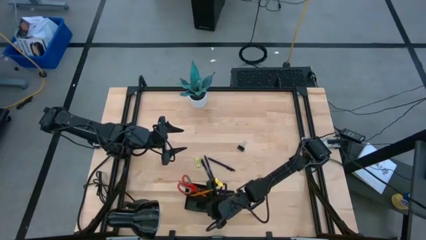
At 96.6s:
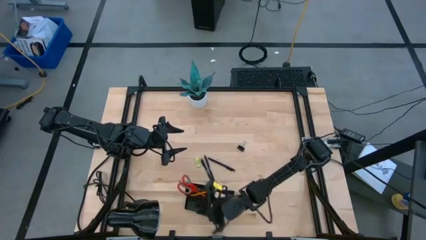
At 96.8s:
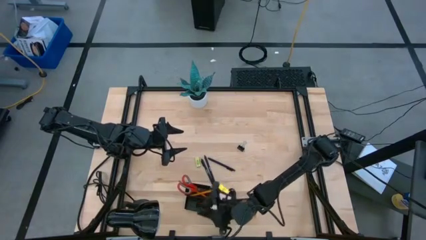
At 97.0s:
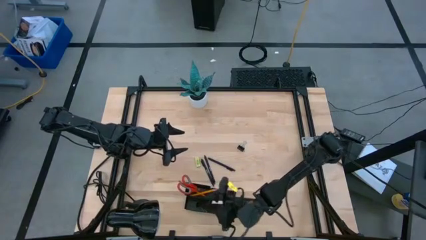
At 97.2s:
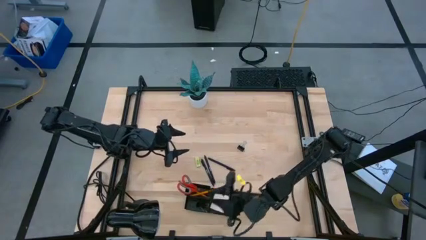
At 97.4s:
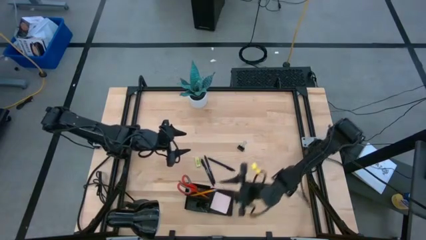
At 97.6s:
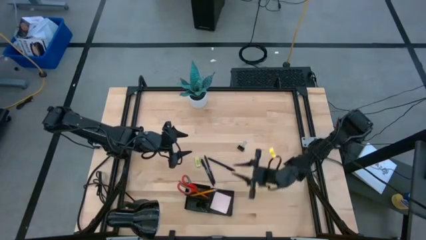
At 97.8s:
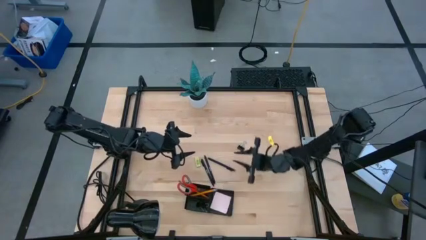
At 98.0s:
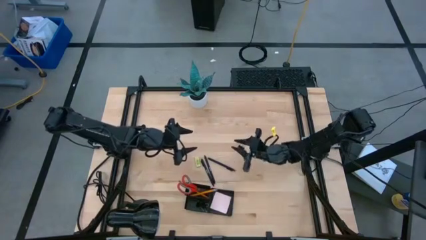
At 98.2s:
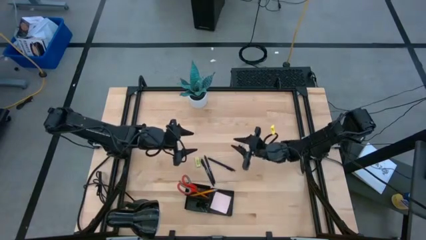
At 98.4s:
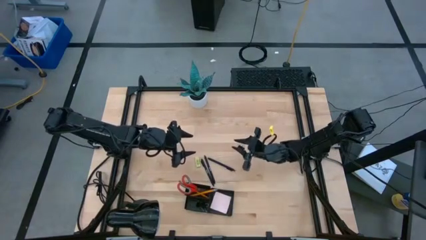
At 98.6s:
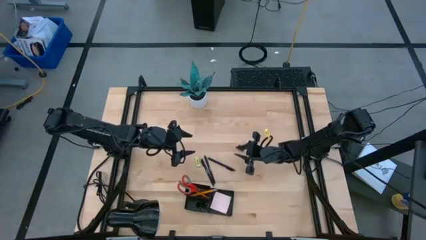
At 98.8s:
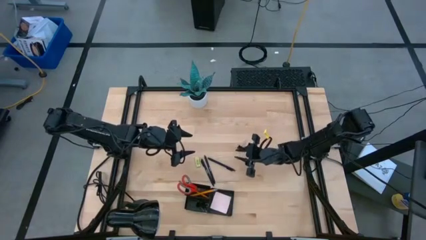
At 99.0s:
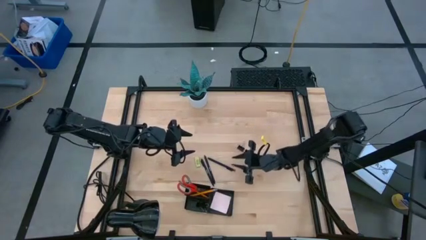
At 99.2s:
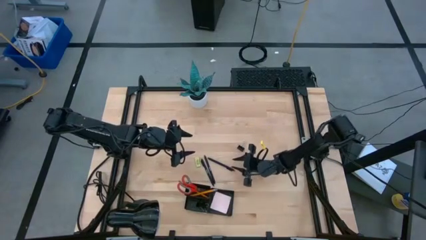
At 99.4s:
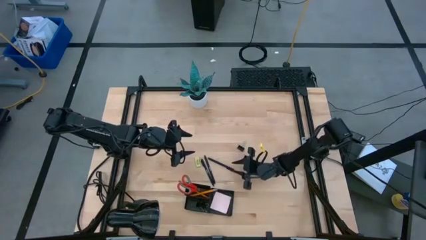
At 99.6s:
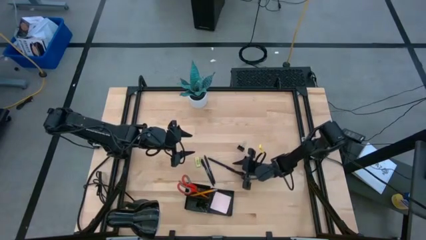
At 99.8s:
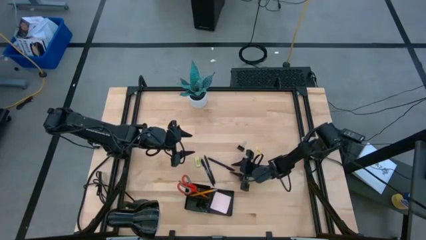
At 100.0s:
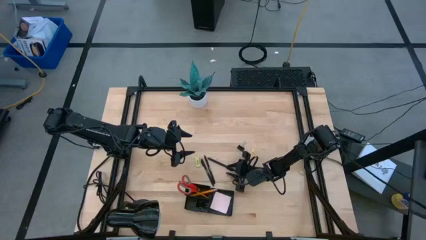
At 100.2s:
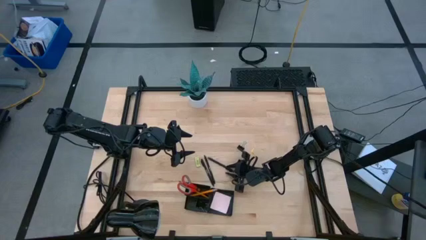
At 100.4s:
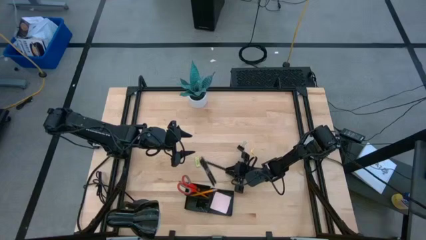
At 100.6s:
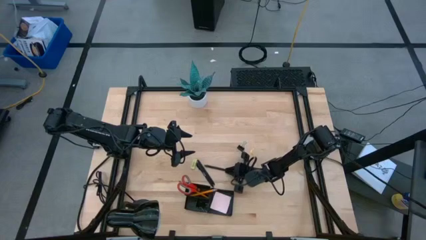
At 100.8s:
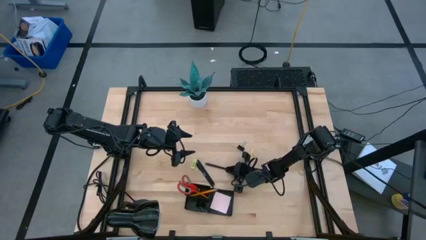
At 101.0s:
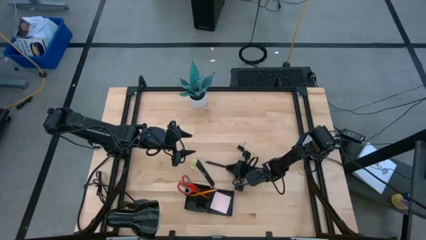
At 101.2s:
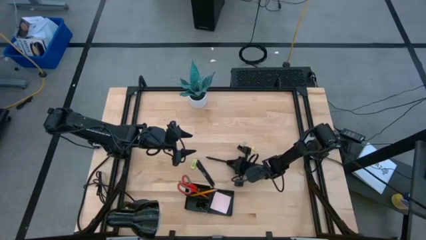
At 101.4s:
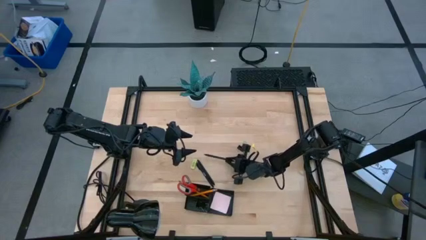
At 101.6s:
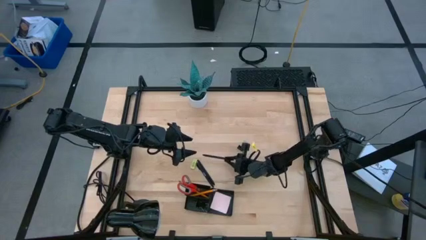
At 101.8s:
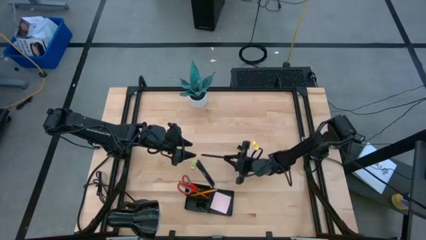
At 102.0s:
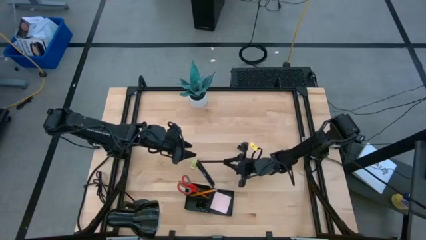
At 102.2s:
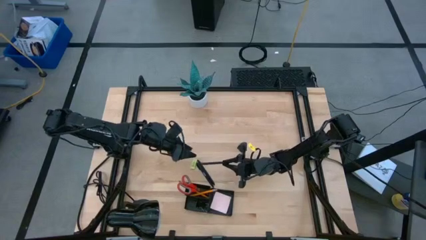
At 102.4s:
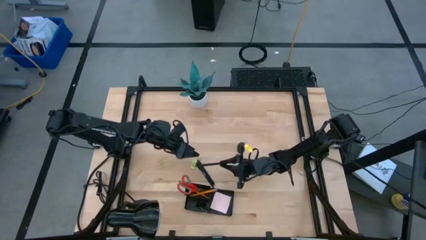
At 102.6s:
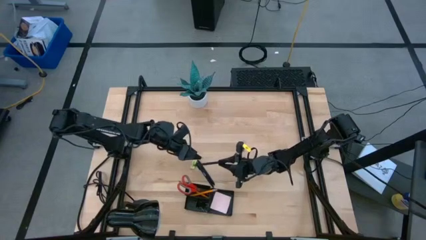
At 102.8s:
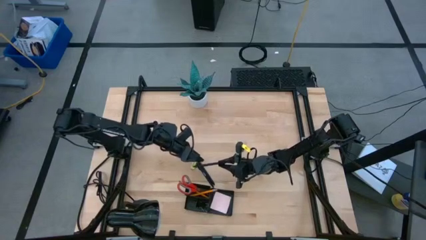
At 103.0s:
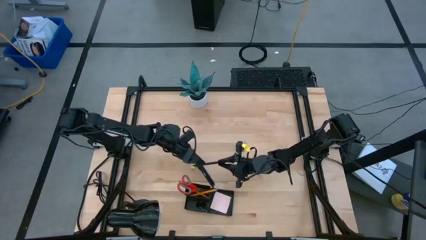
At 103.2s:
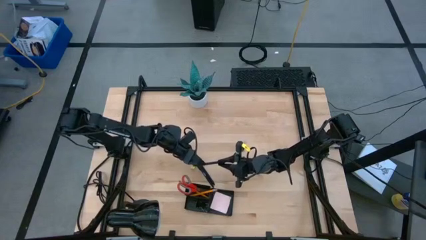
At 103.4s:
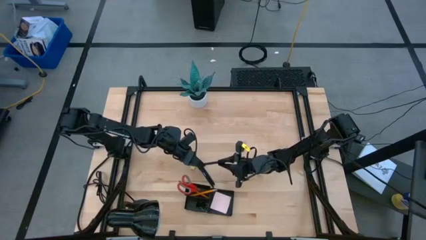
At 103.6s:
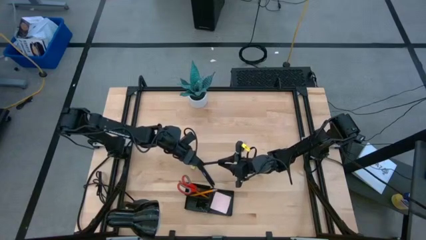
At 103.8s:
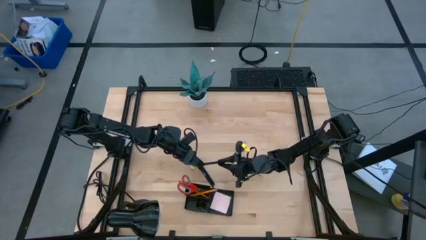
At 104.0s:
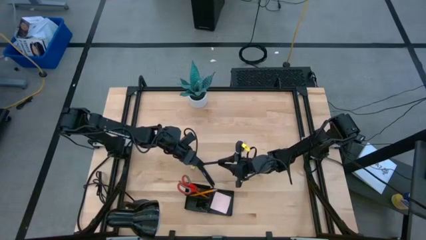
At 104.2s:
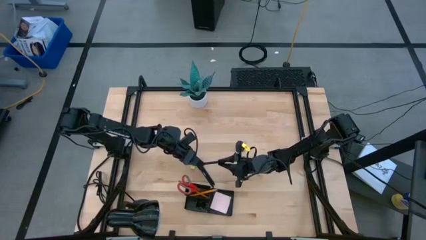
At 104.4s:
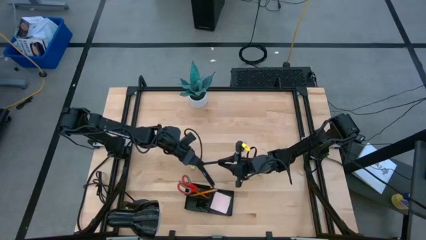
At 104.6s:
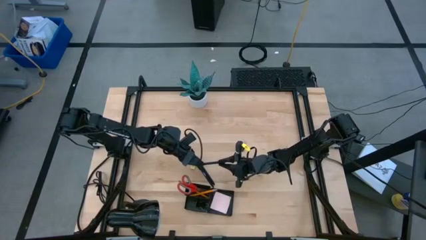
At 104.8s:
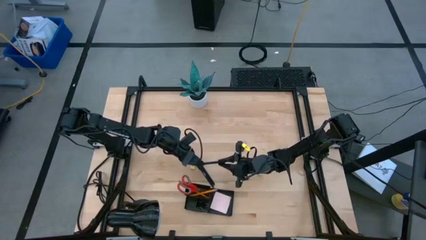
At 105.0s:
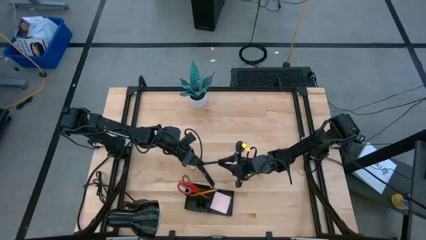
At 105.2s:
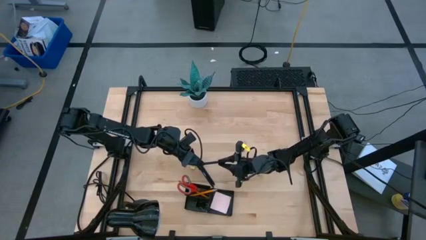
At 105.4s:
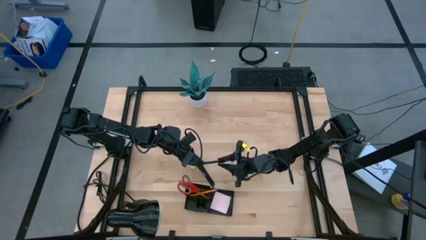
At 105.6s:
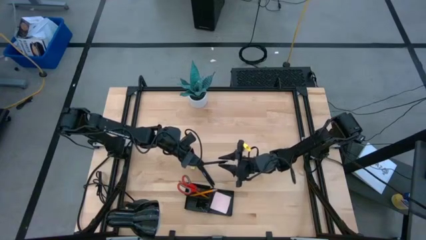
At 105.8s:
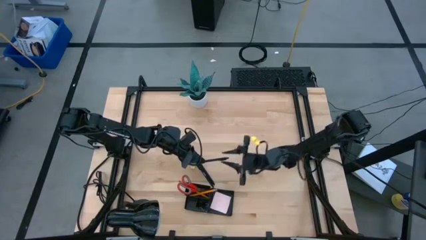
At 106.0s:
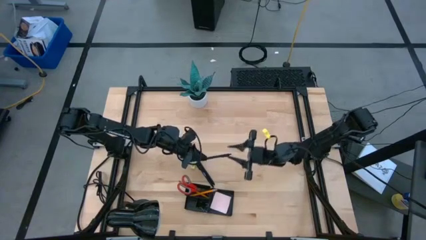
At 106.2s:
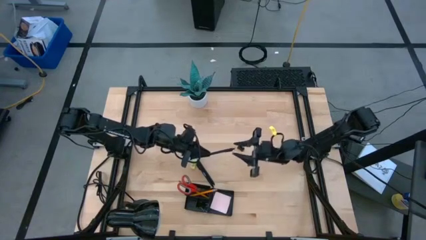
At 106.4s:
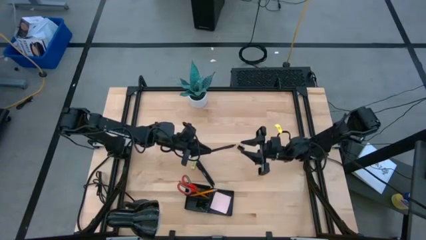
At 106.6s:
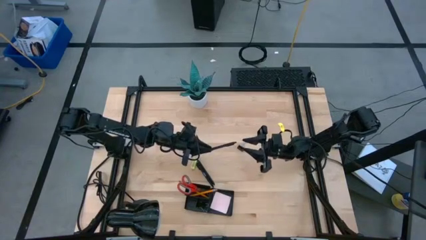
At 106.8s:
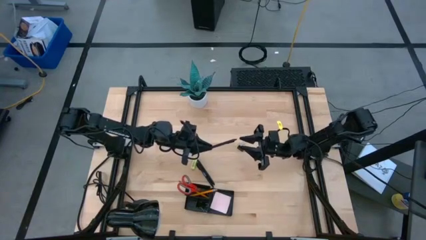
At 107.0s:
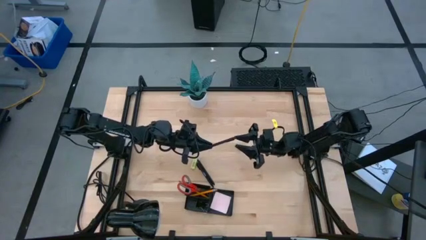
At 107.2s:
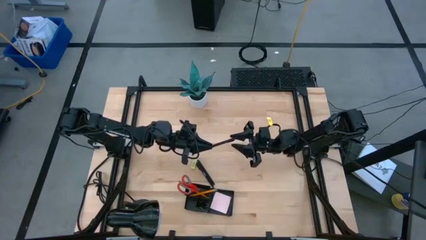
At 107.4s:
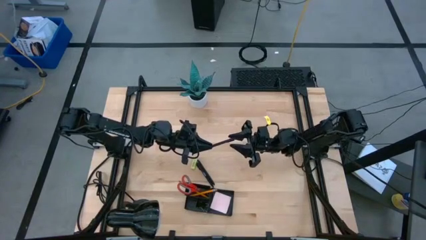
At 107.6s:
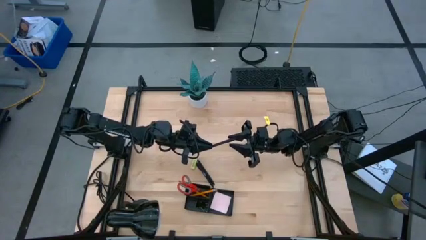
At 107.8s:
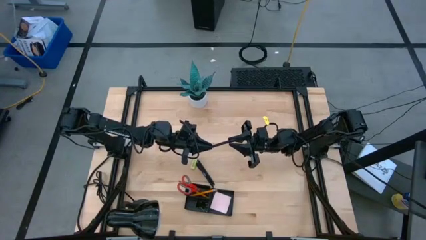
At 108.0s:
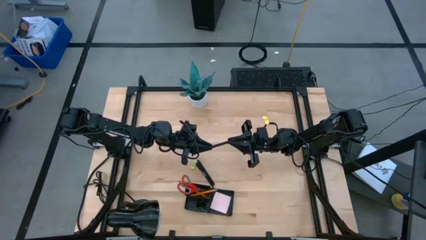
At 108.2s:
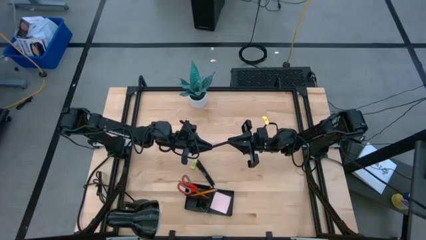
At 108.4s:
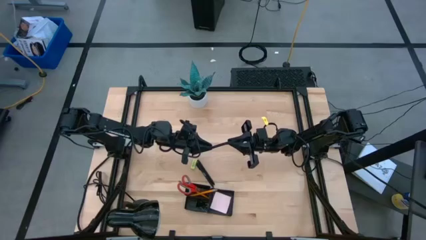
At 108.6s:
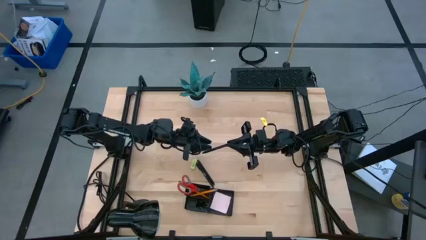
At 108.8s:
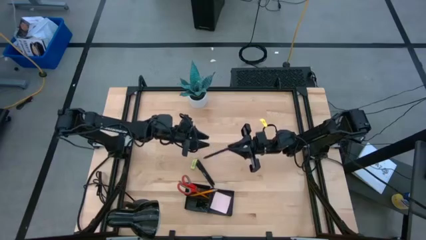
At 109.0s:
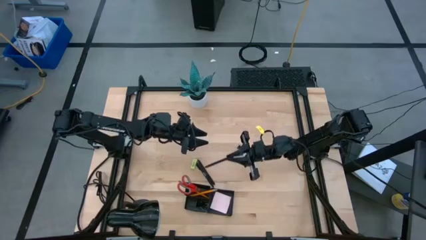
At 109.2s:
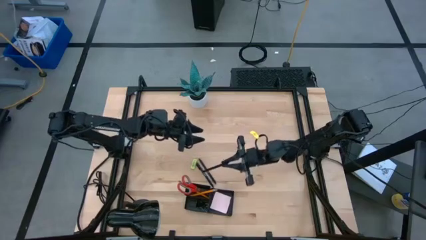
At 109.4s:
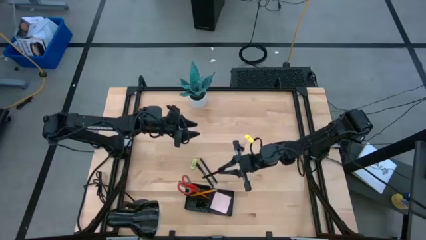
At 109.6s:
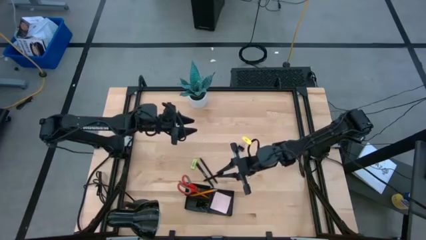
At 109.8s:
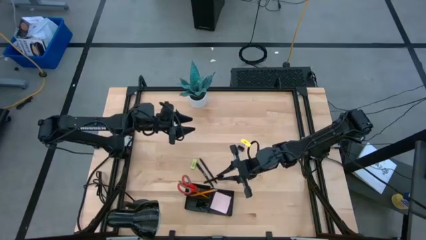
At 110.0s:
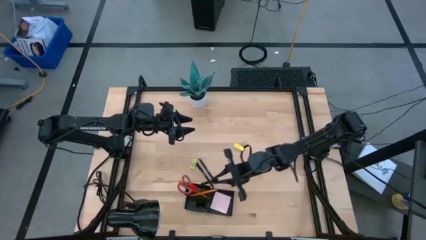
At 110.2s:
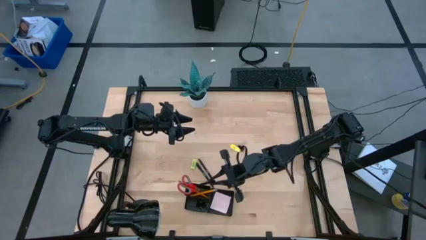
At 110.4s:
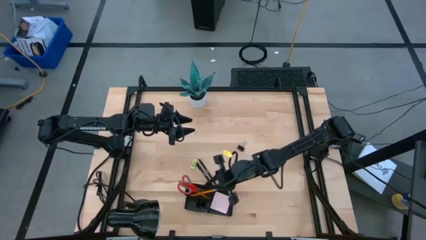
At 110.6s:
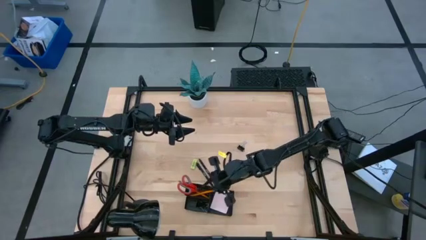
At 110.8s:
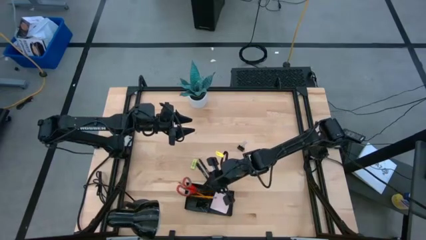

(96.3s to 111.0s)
Task: Pick and place office supplies into organizer
Put the black pen into the black desk organizer

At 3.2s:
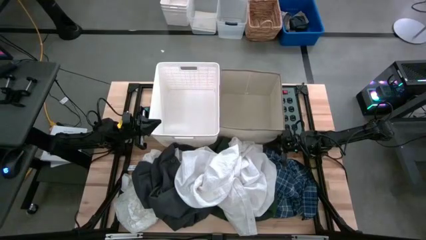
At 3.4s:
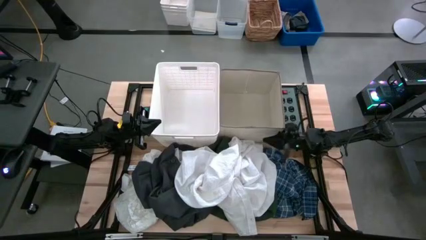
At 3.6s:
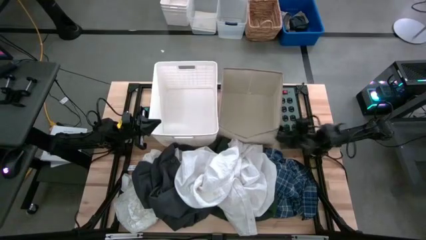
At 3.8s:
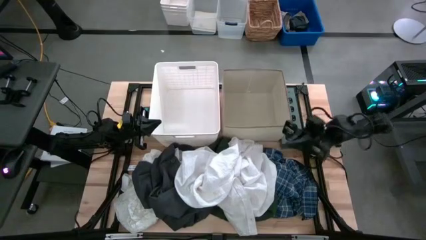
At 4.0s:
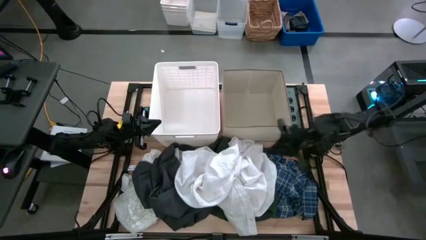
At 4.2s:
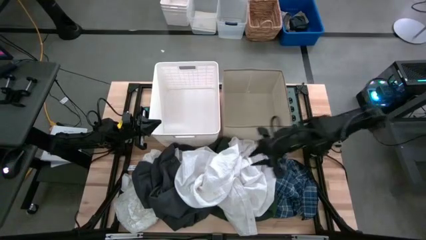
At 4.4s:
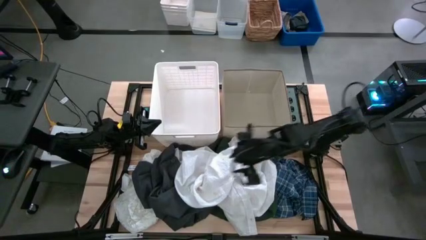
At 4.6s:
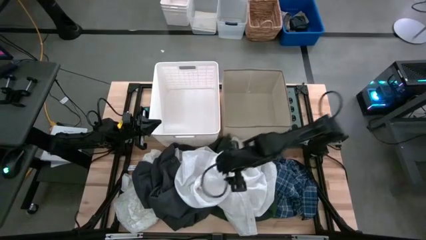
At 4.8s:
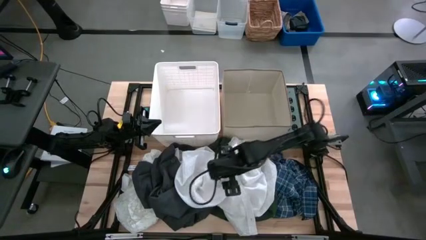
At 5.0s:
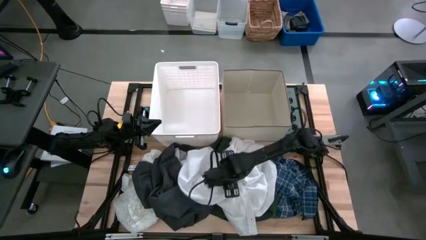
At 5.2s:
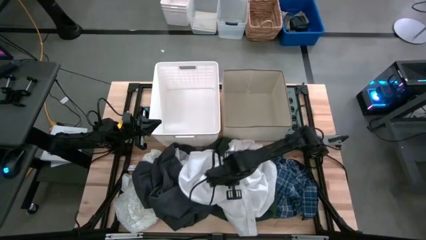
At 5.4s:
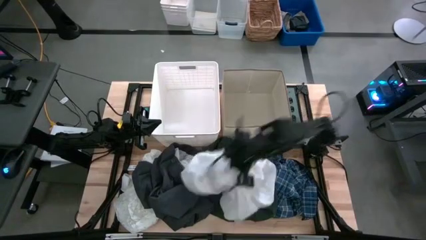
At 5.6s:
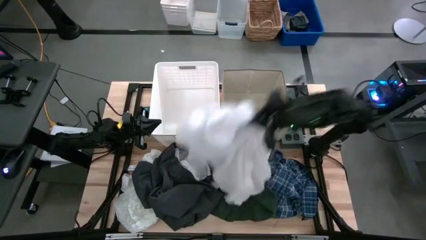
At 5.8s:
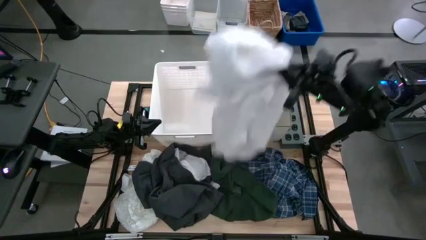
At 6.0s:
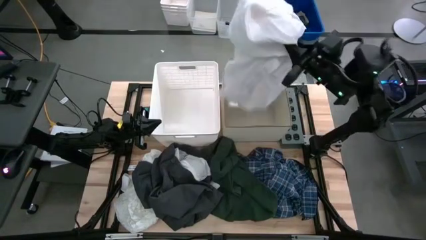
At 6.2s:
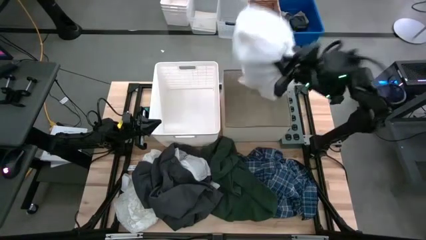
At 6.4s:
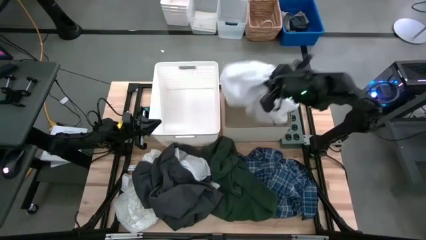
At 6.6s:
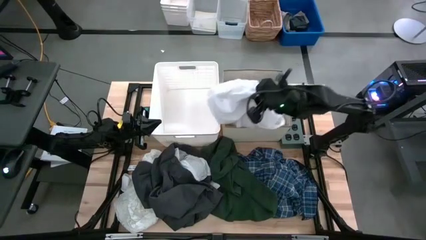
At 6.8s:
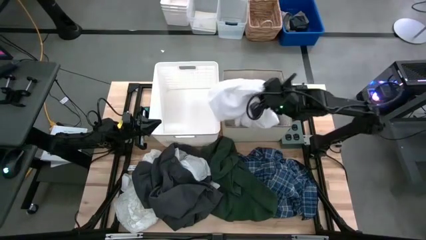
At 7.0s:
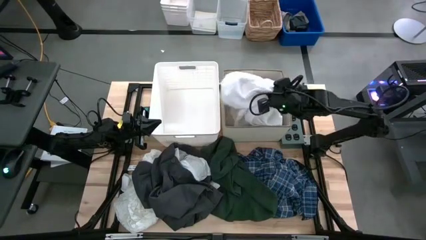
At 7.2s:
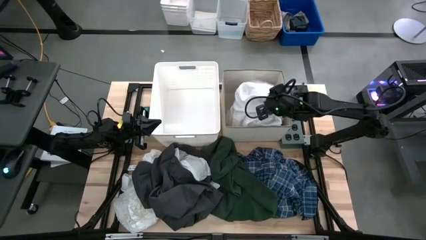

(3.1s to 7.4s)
Task: Sort clothes
Put the white shirt into the laundry organizer
